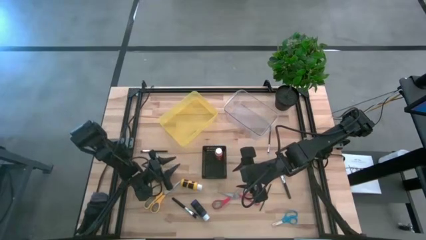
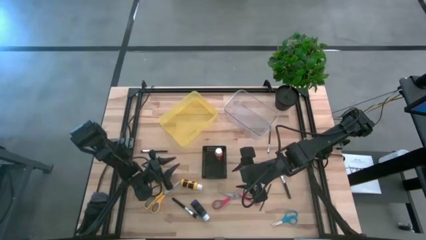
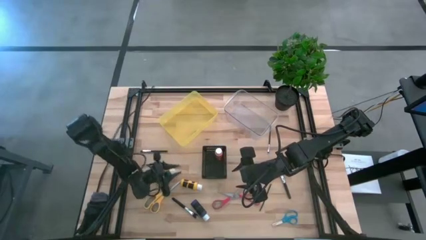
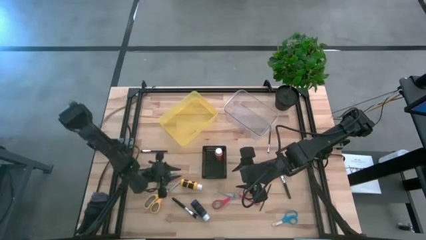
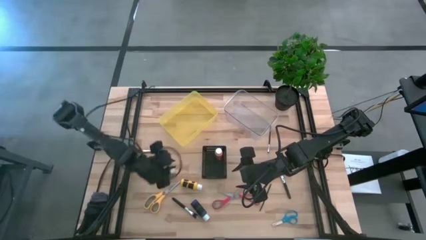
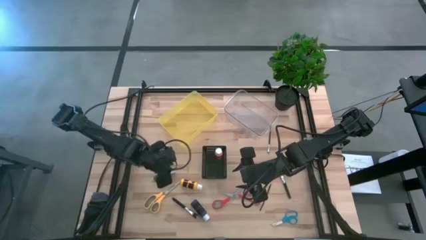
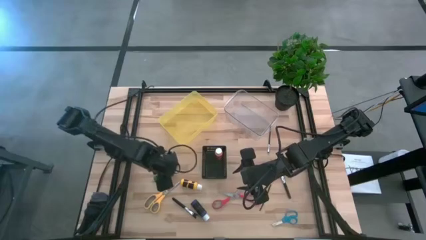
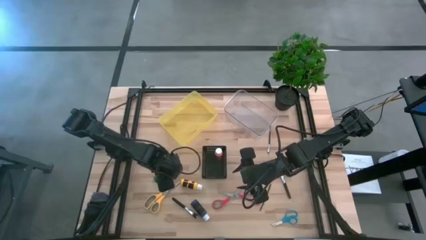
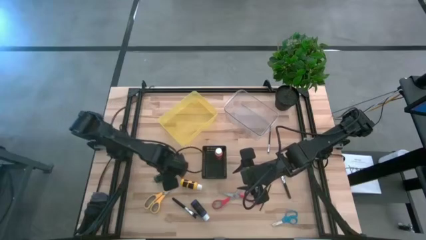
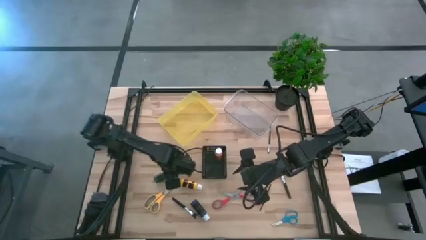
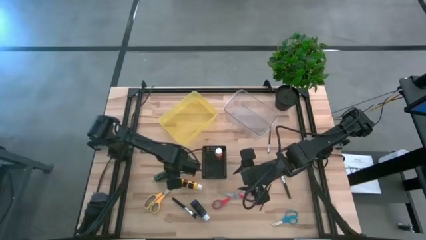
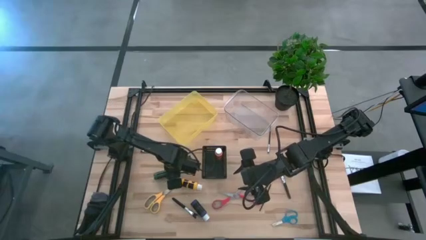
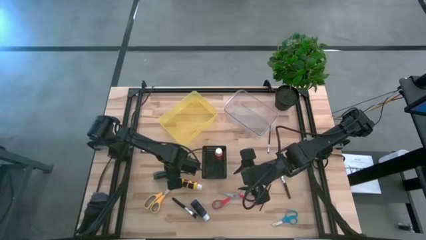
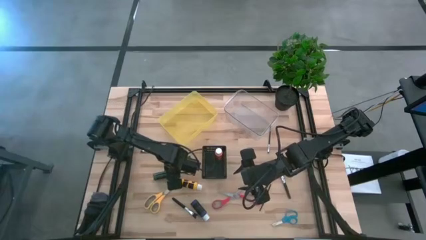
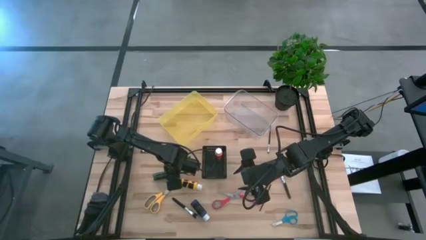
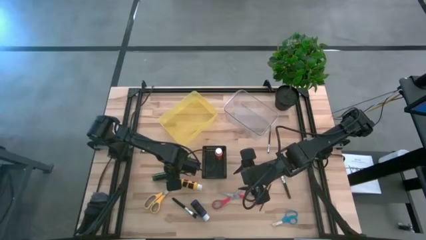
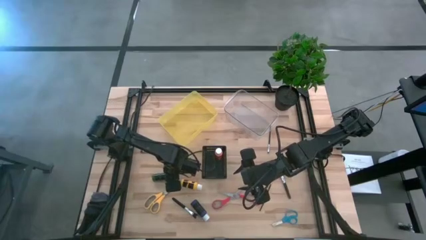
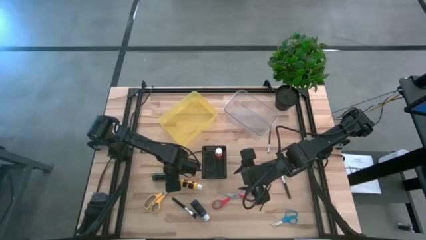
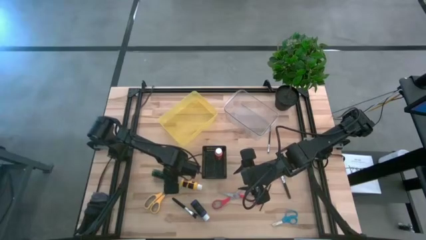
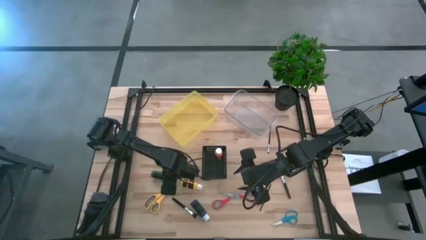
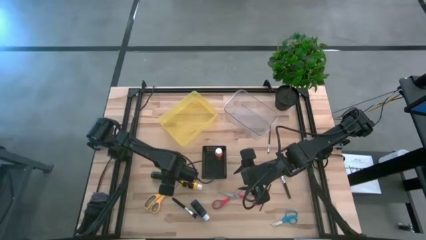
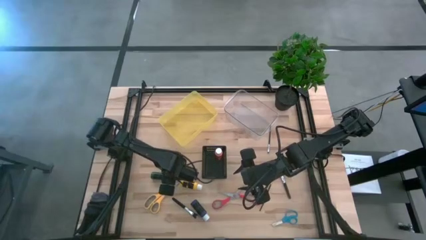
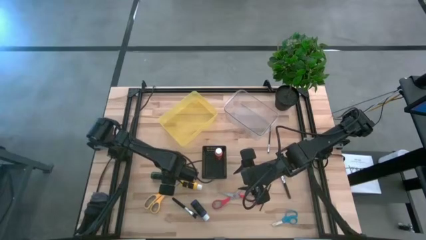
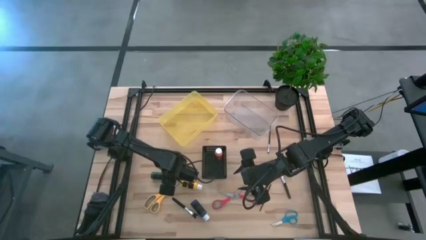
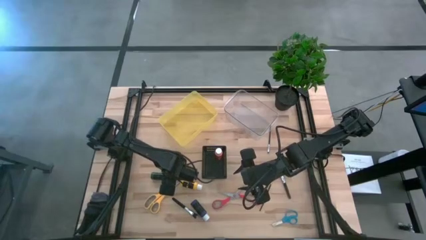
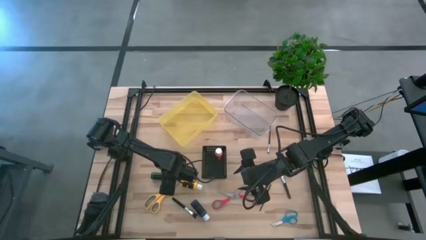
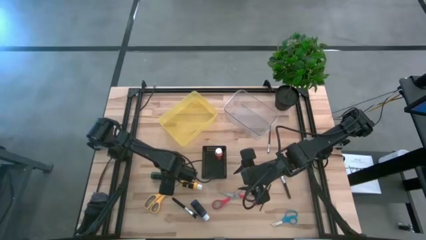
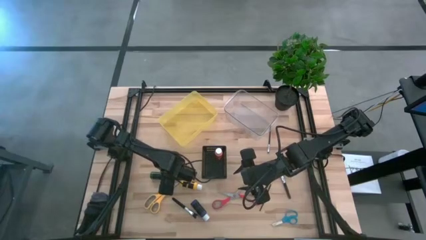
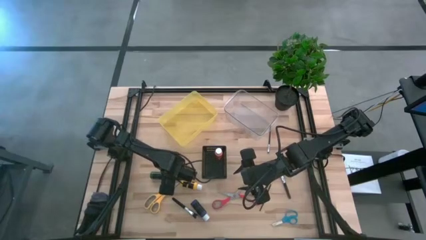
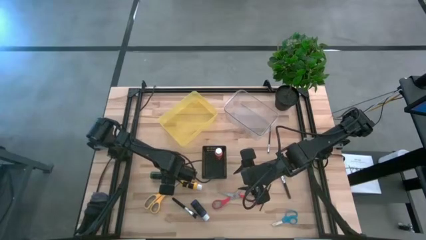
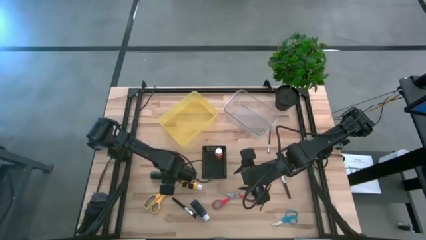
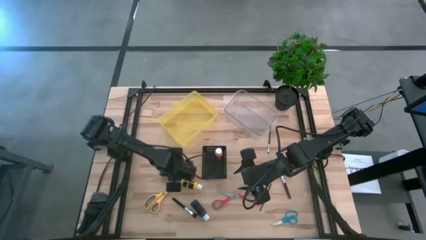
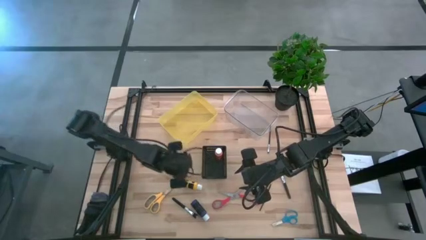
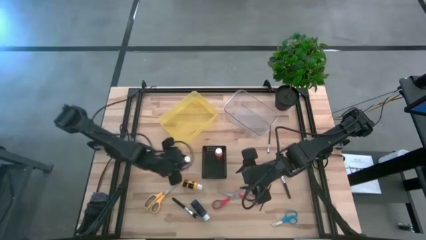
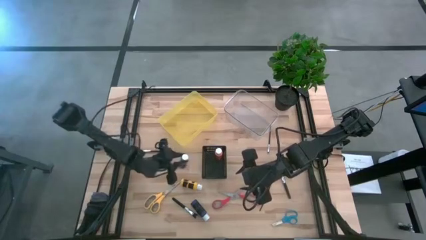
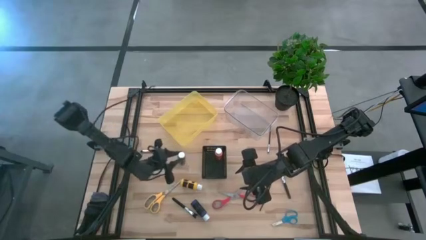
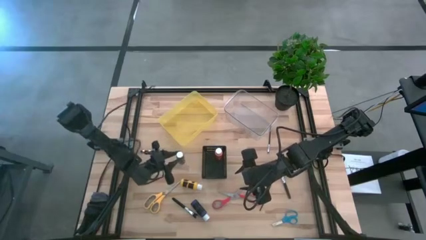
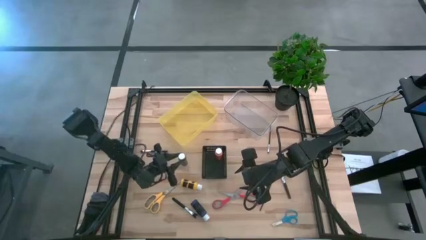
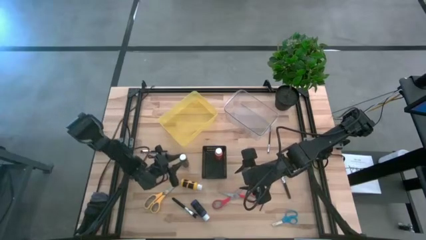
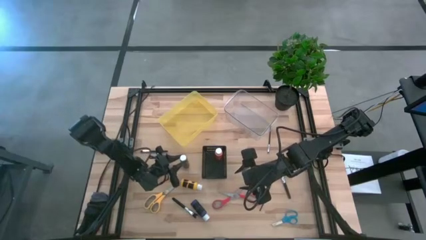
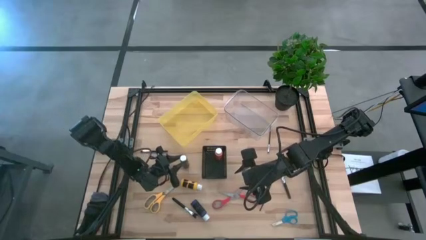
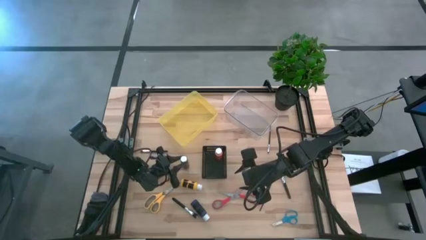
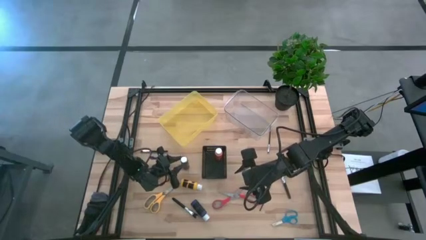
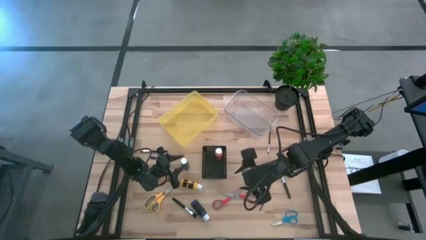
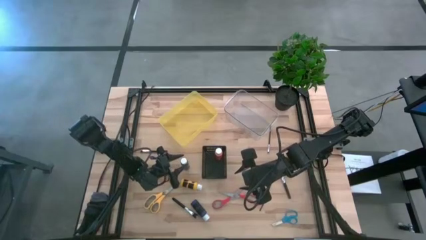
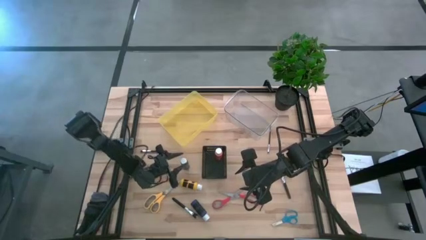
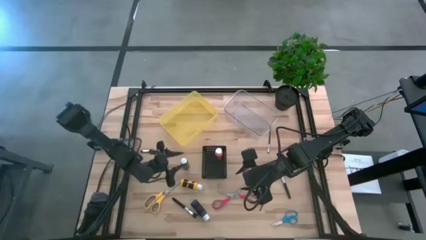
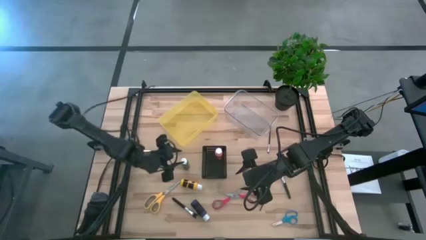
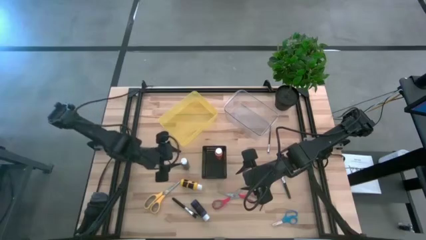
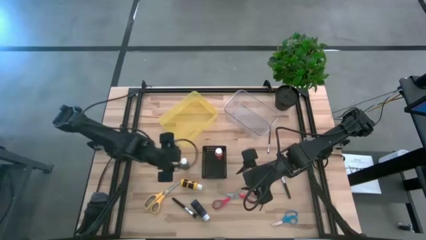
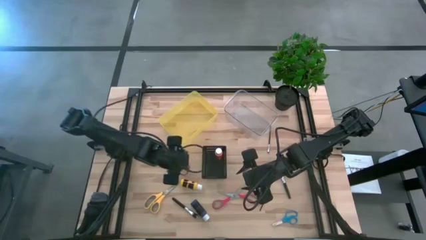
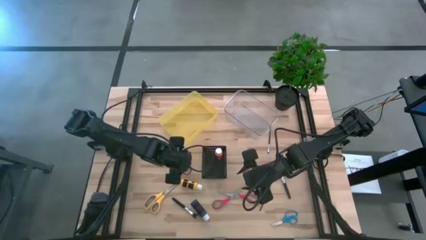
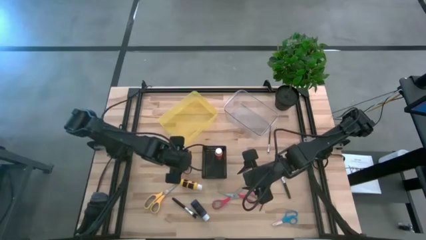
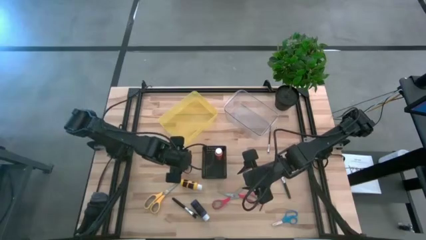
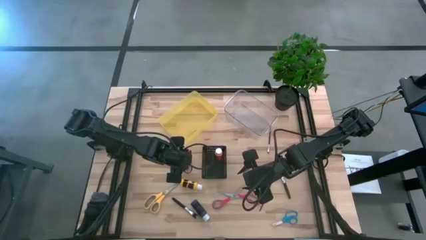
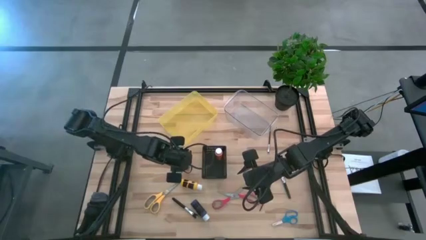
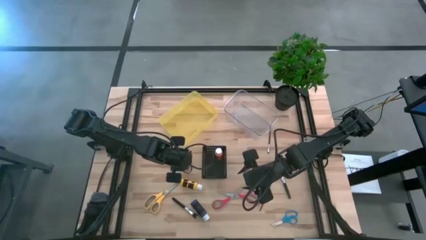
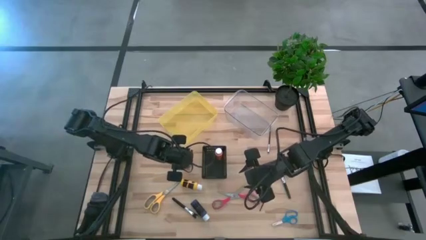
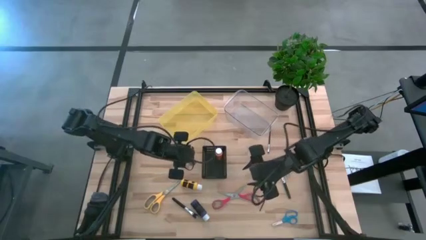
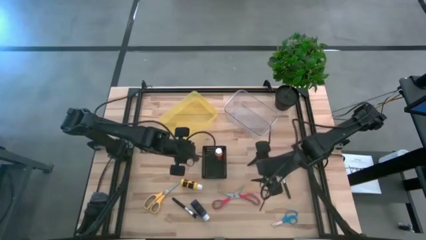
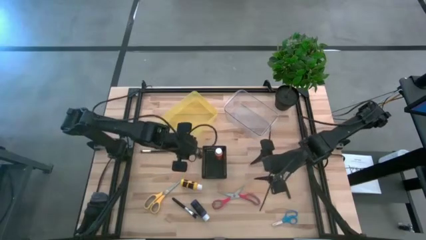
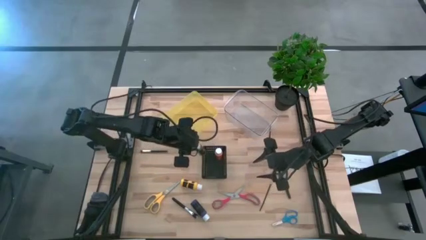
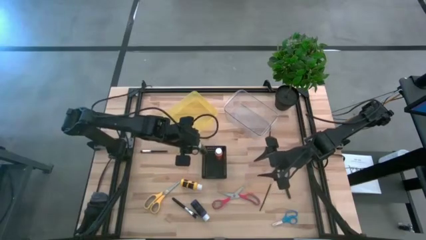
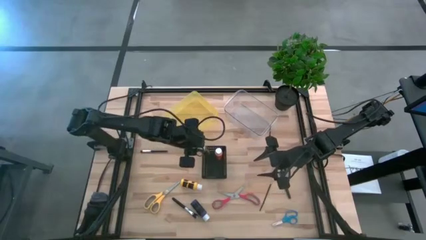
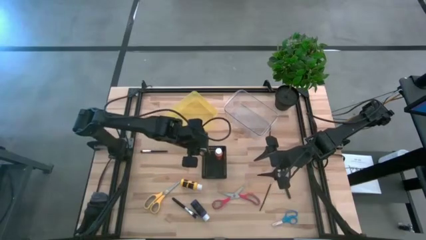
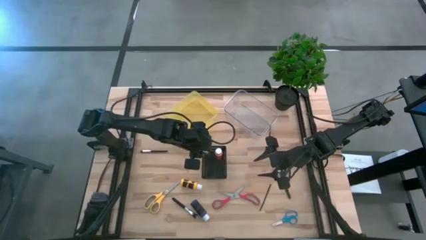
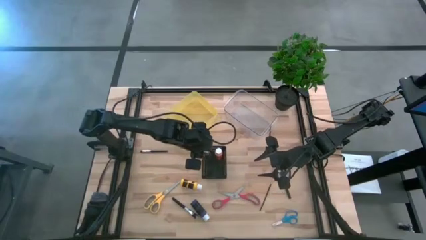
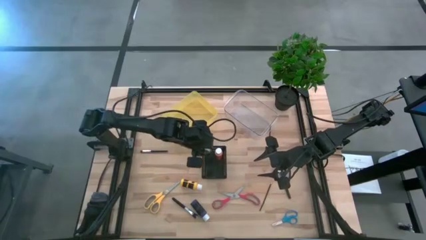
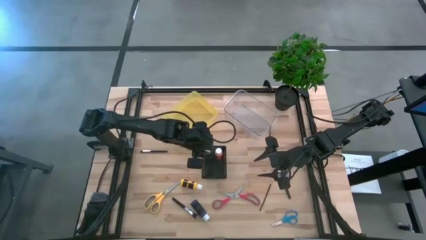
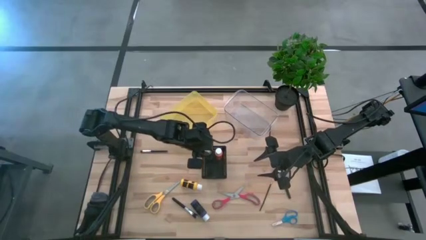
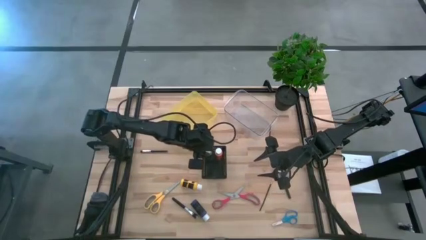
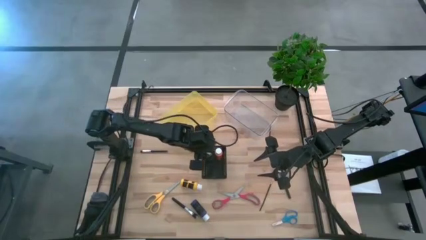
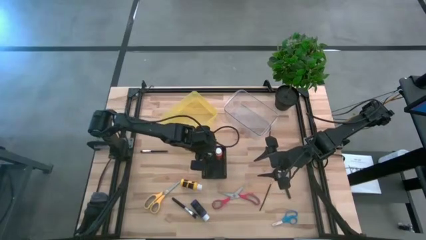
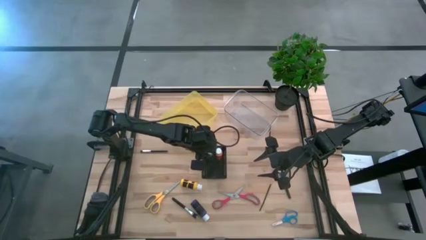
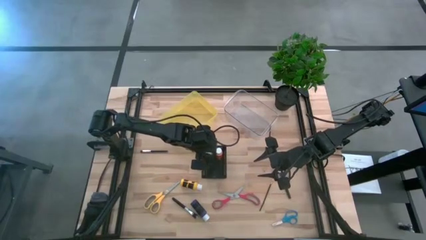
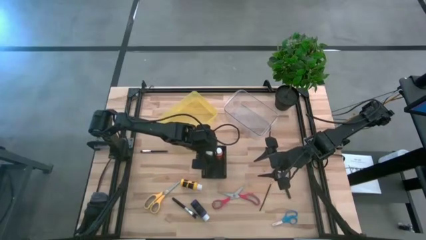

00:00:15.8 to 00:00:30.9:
Task: Pick & Place Paint Supplies
Put the green paint bottle into the black bin
